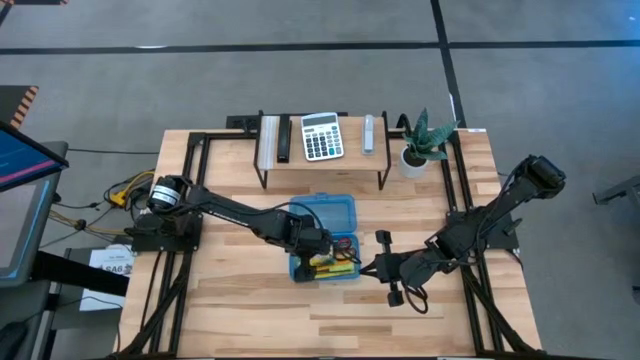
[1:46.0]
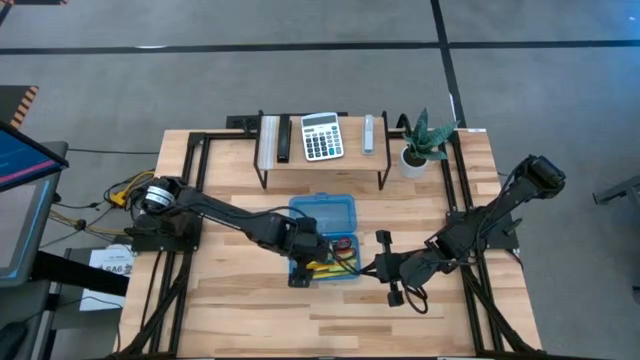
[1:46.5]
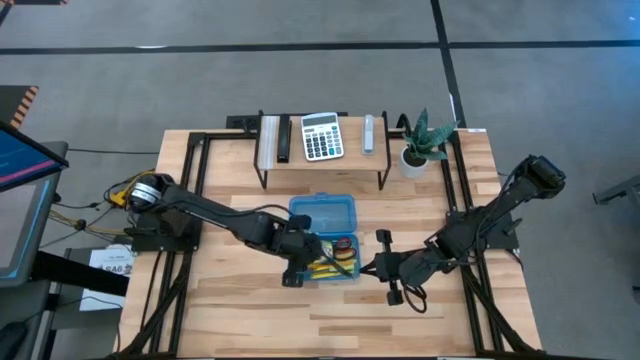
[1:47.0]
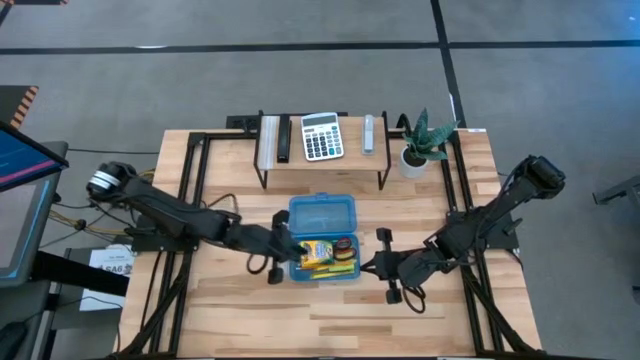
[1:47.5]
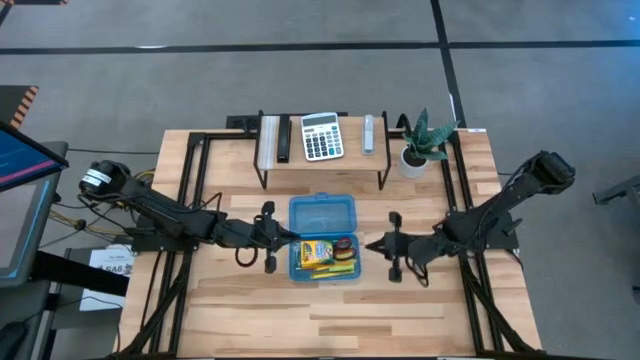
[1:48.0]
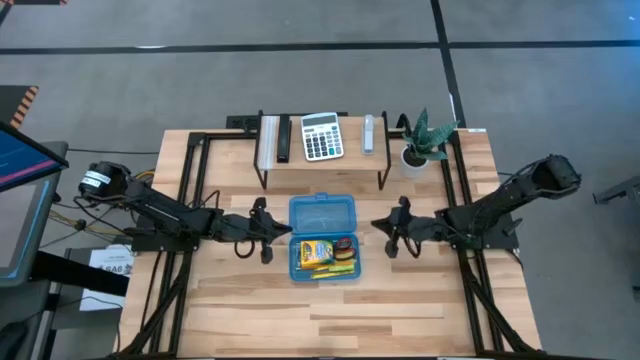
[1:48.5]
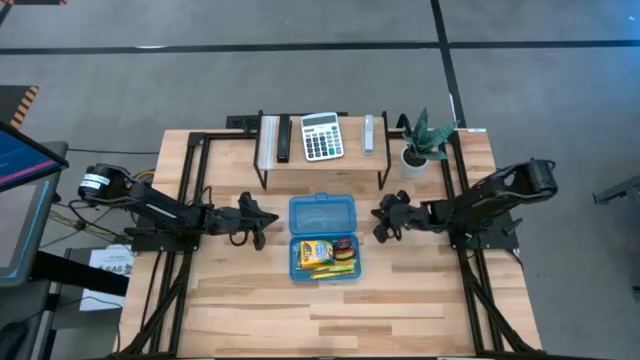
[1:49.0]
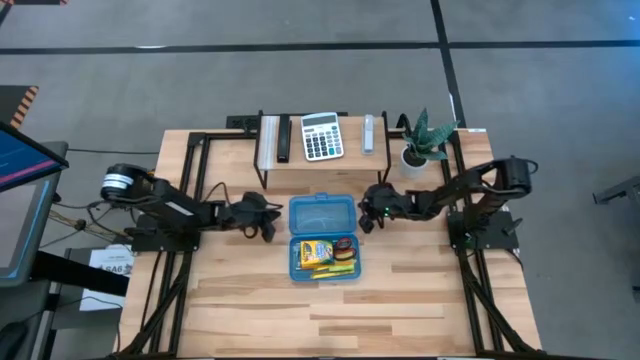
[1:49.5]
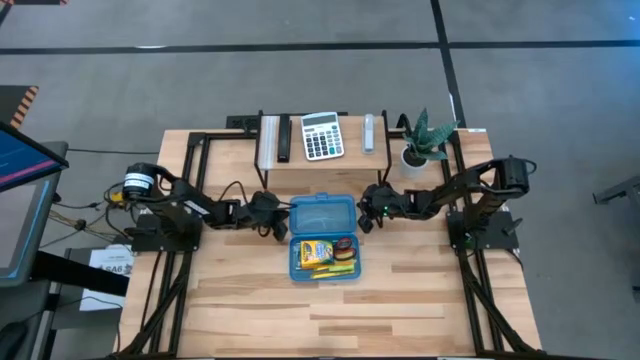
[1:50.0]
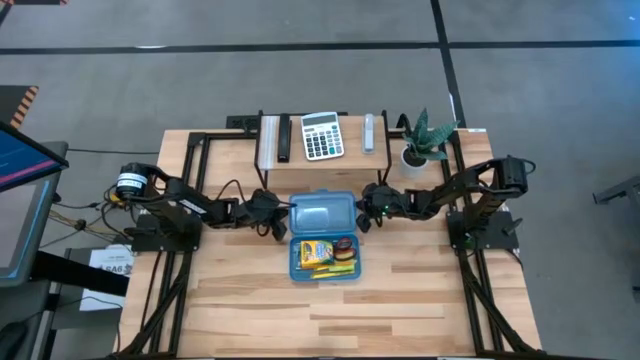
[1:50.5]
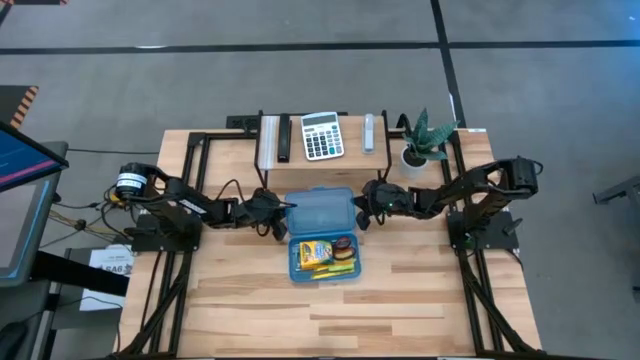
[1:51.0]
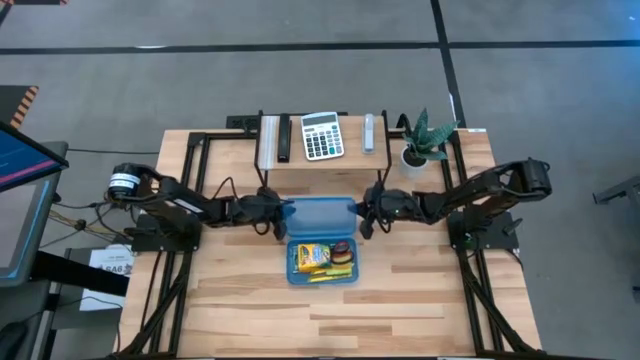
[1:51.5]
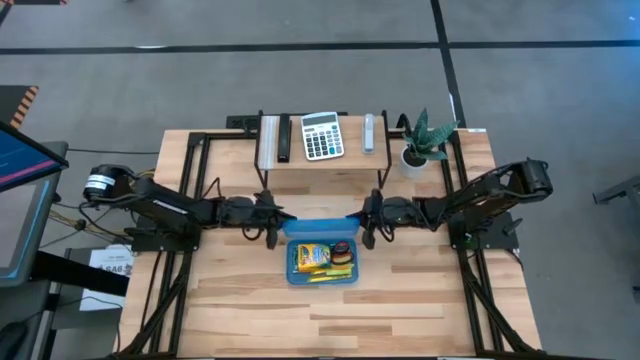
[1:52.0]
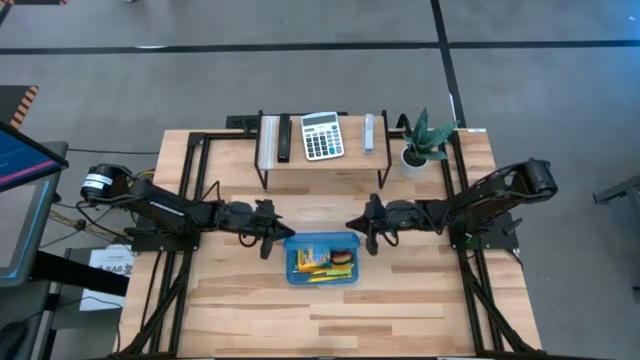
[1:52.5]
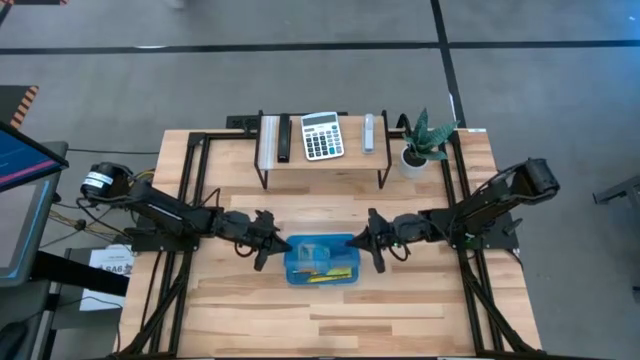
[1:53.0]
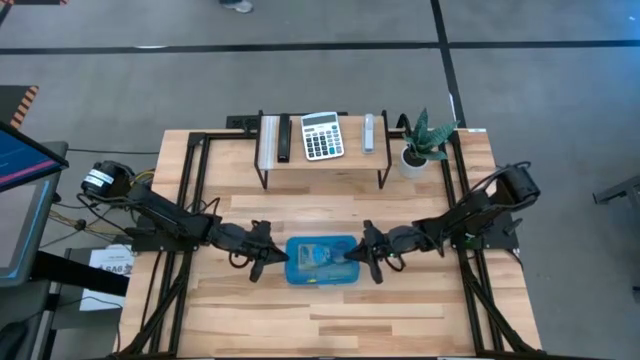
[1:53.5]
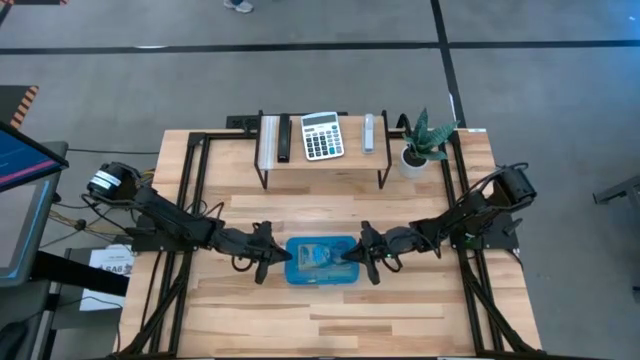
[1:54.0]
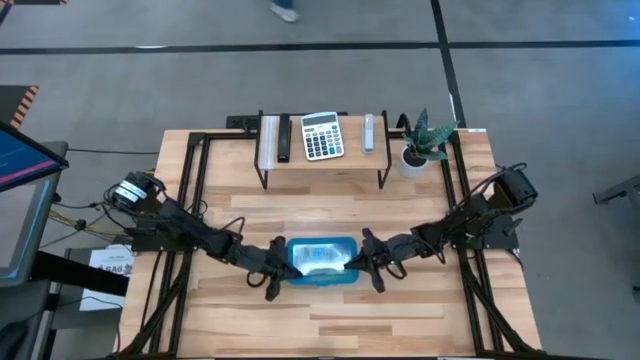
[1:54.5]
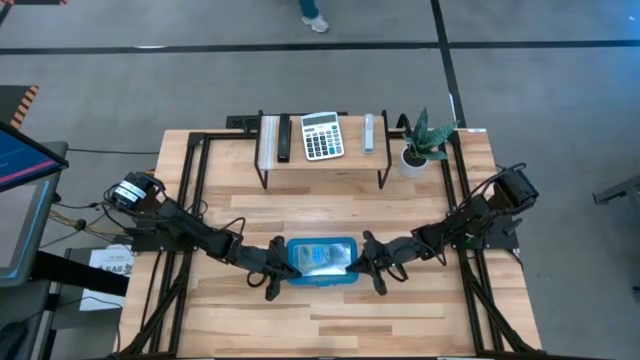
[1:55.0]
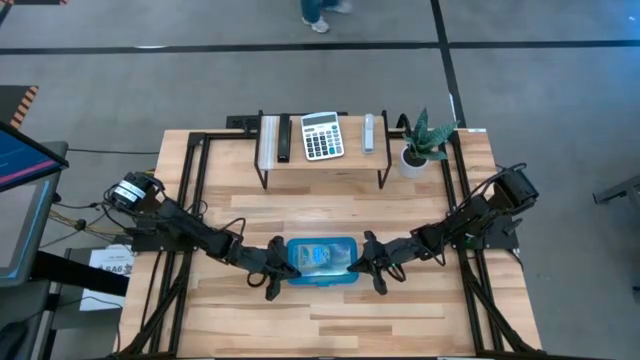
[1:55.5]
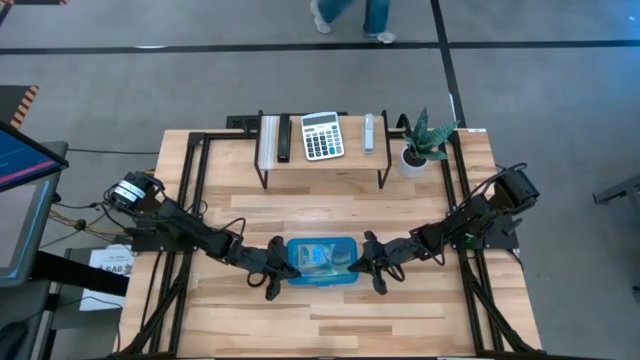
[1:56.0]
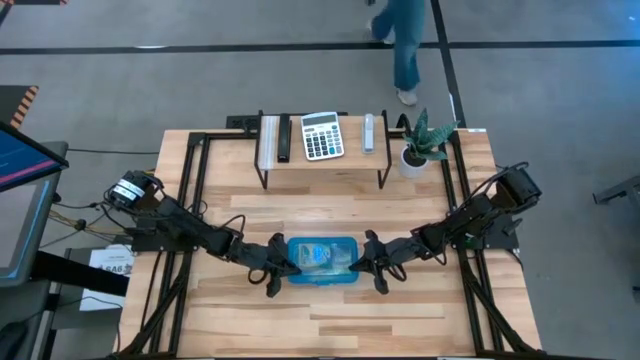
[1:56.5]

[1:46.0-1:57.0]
Task: Pack school essentials
Close the blue supply box

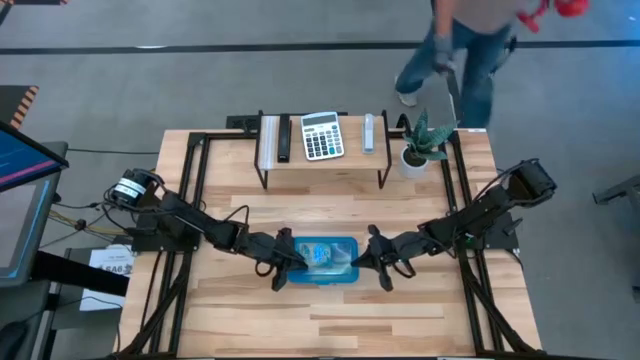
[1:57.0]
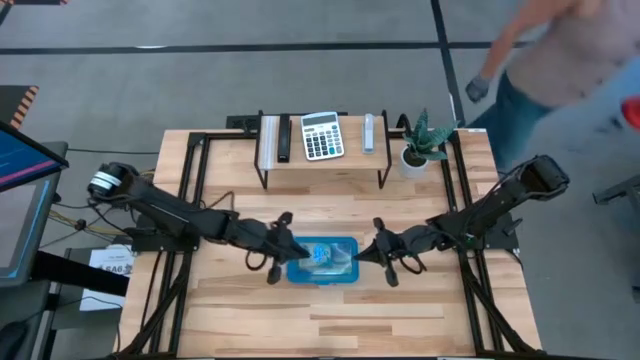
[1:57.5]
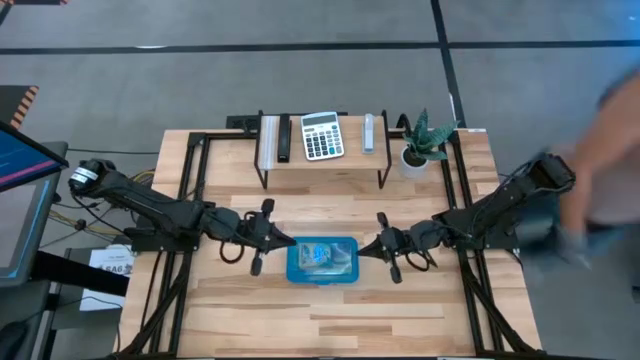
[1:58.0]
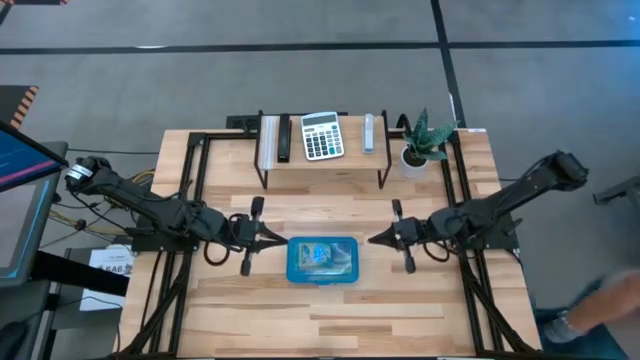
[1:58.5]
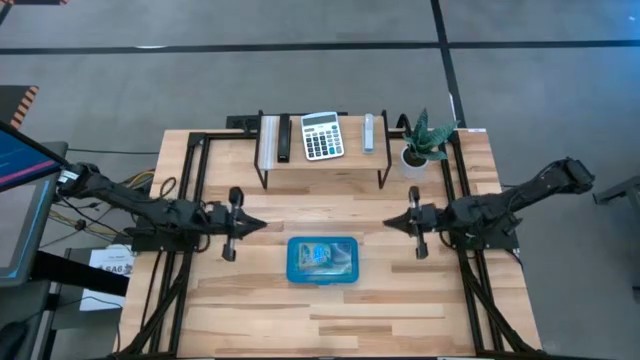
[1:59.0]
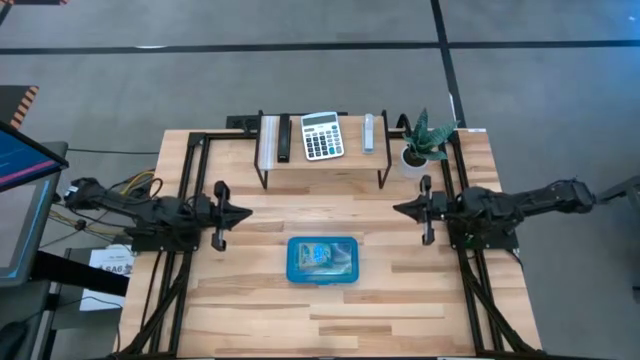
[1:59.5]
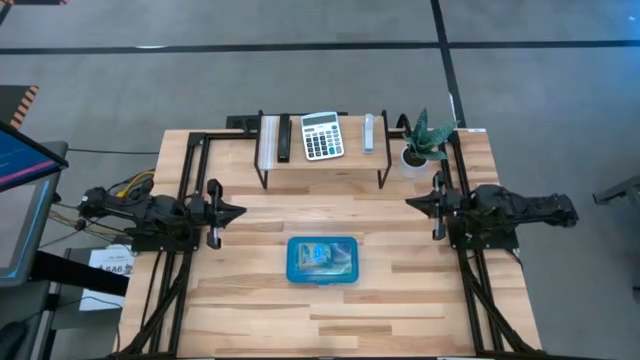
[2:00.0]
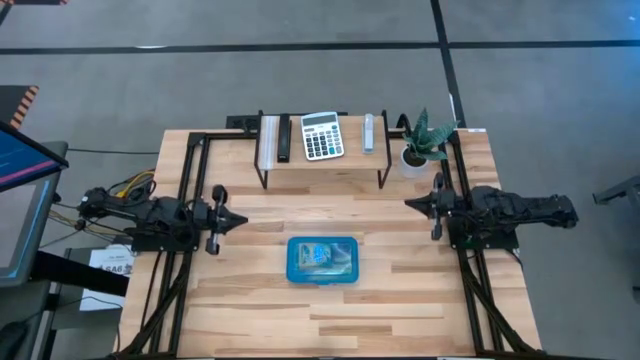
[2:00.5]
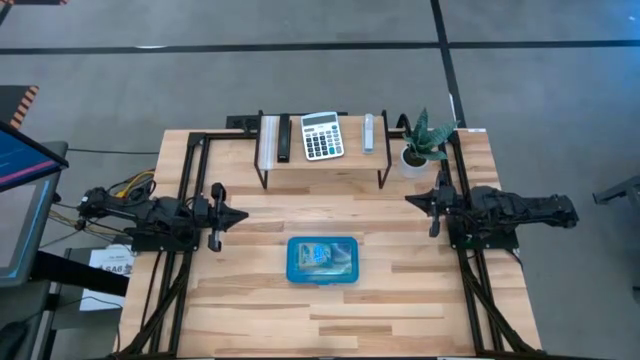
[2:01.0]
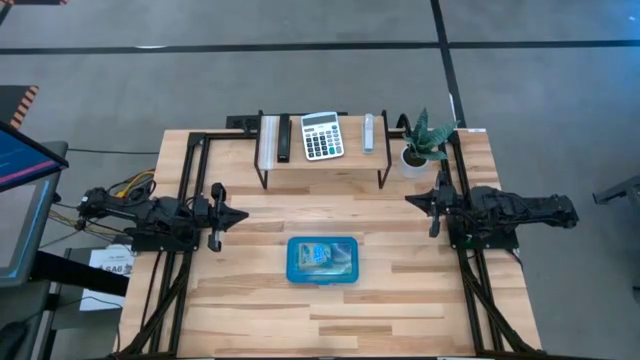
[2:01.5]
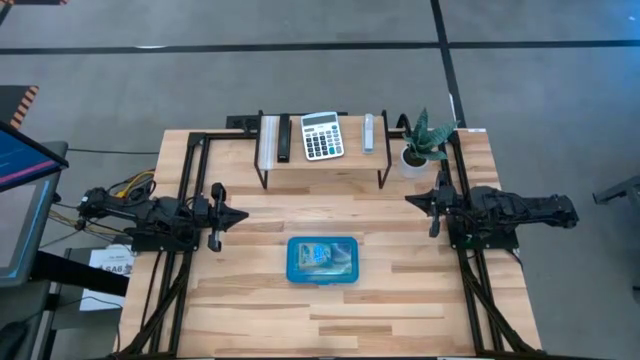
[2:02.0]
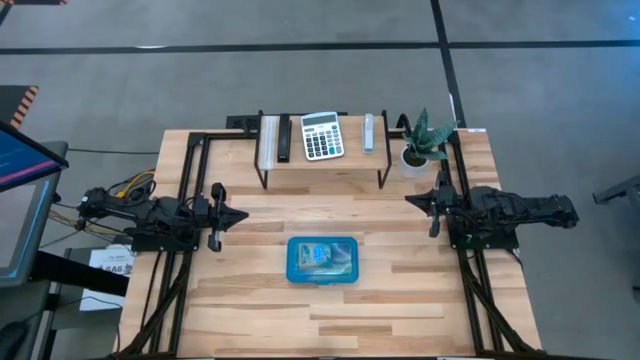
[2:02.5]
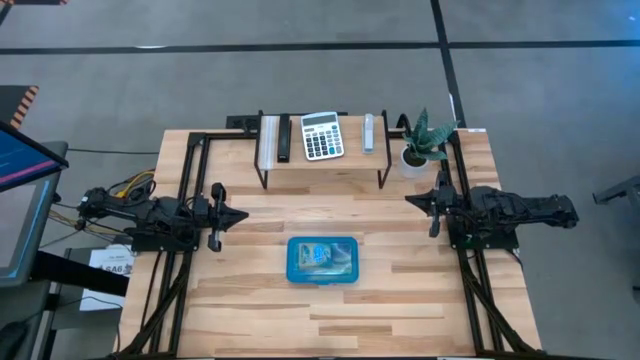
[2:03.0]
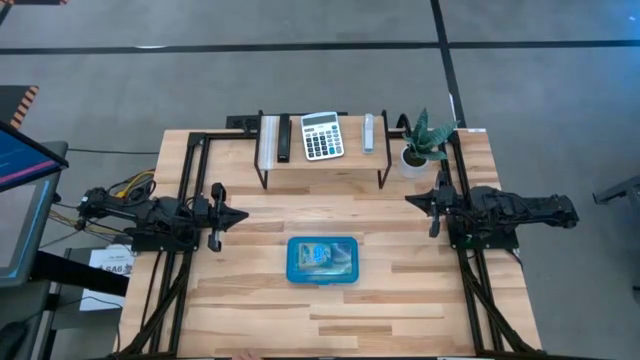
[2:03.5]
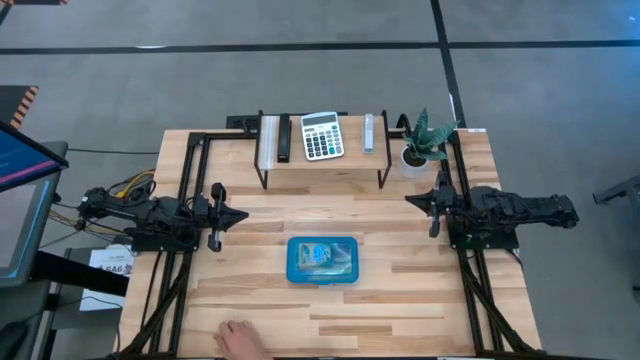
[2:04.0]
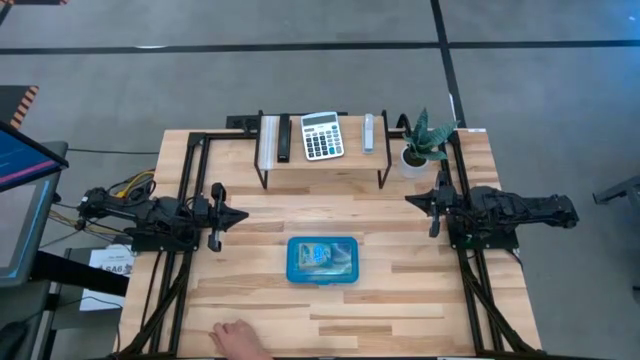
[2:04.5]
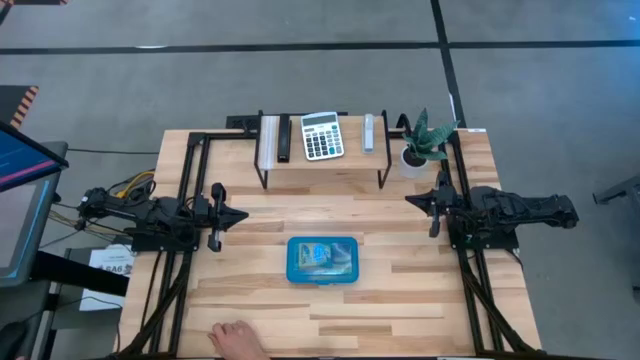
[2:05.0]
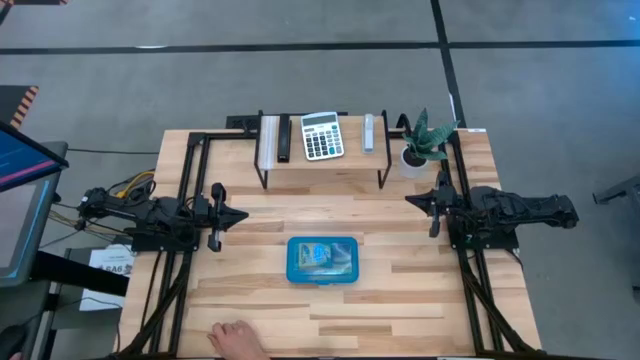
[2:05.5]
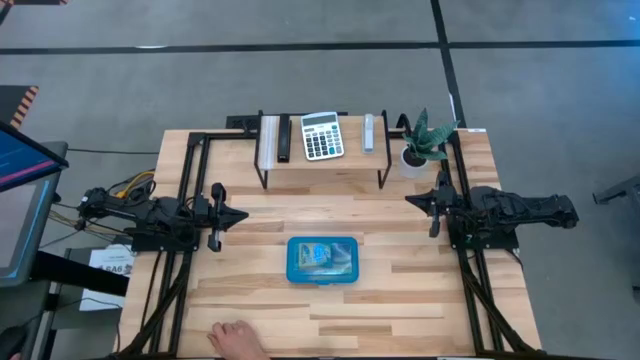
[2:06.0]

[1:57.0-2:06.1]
Return to Home Position
